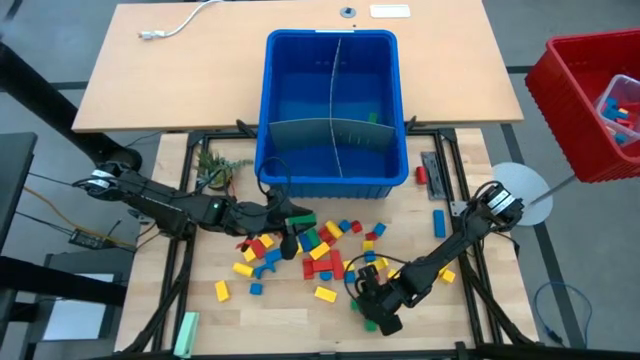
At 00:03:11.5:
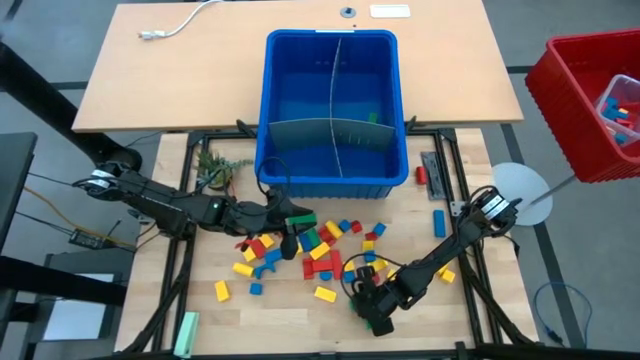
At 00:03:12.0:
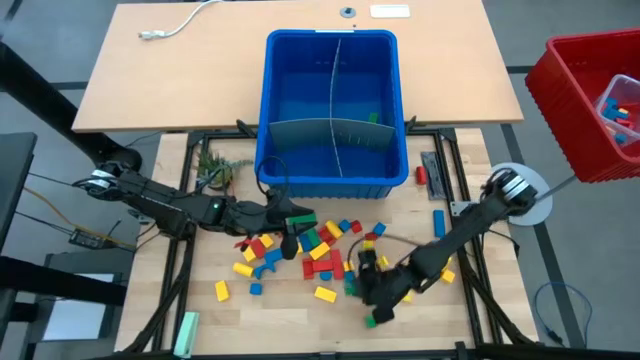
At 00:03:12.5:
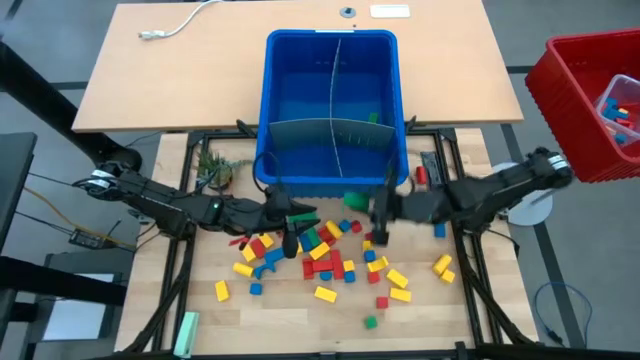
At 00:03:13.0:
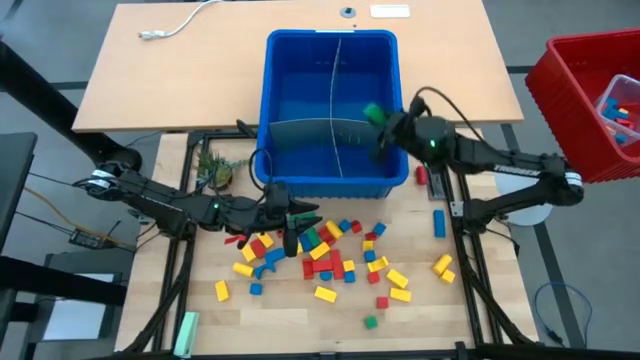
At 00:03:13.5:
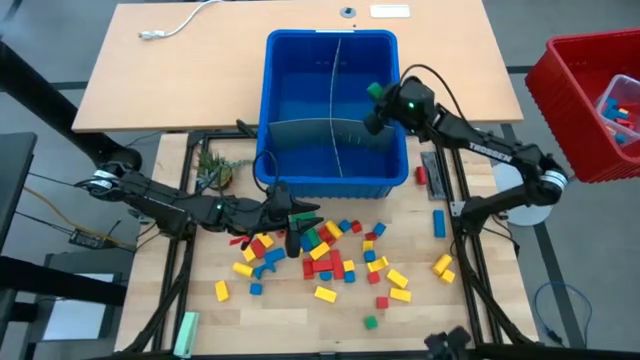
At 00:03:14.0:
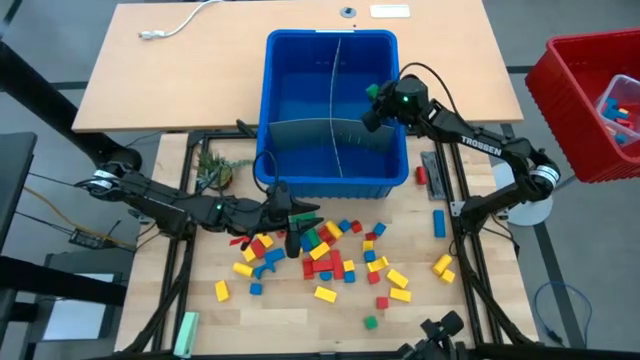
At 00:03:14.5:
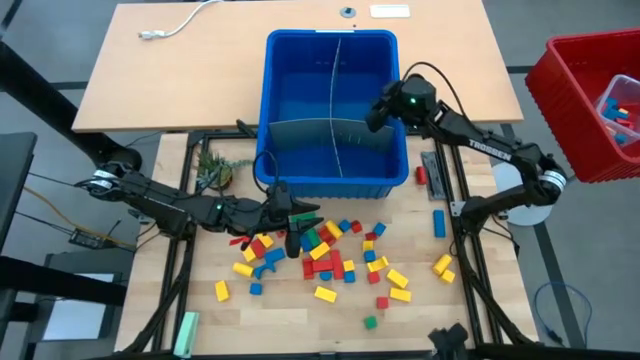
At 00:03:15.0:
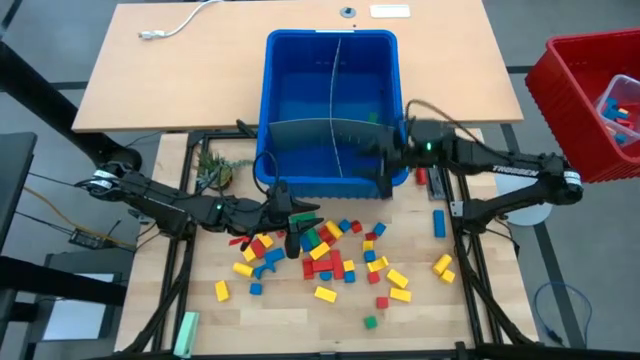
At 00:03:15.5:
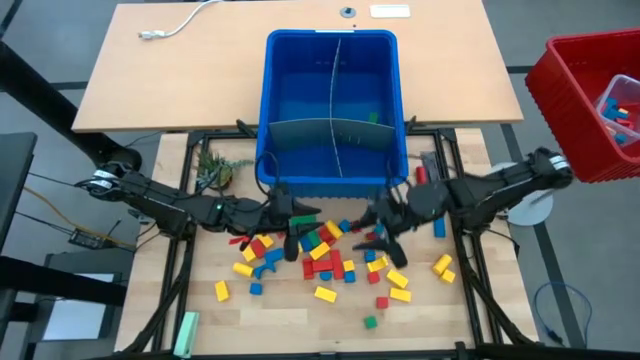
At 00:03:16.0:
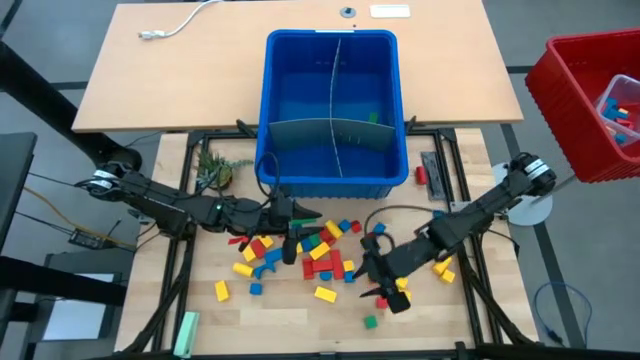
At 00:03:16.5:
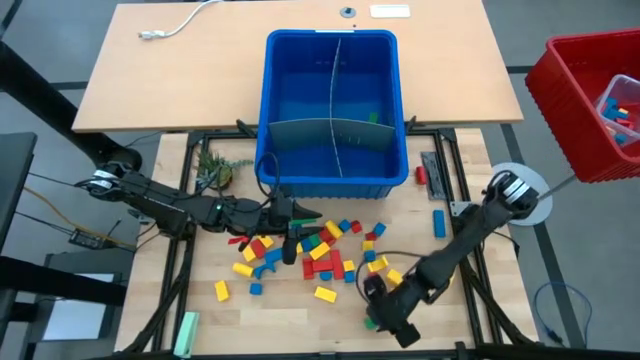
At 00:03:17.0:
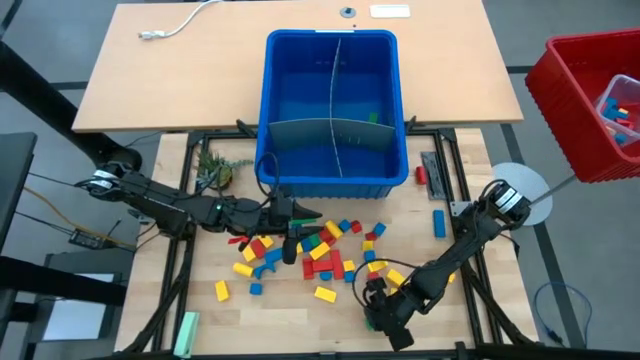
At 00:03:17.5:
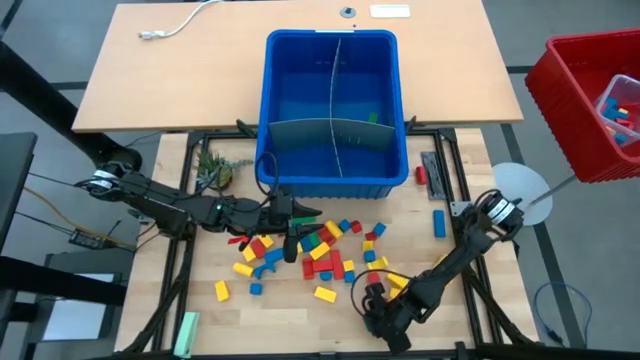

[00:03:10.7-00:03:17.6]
Task: Sort blocks
Put the green block with the other green blocks into the blue bin

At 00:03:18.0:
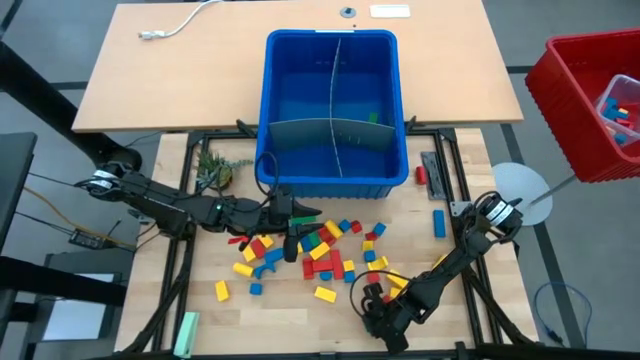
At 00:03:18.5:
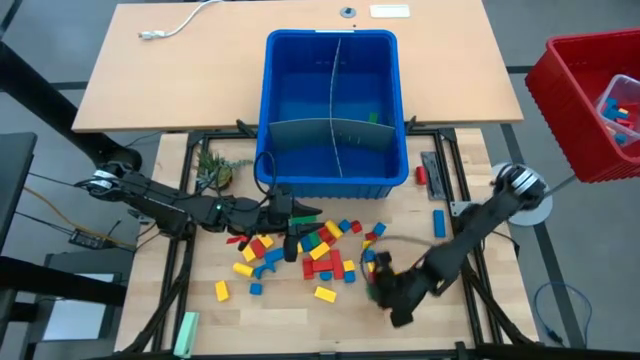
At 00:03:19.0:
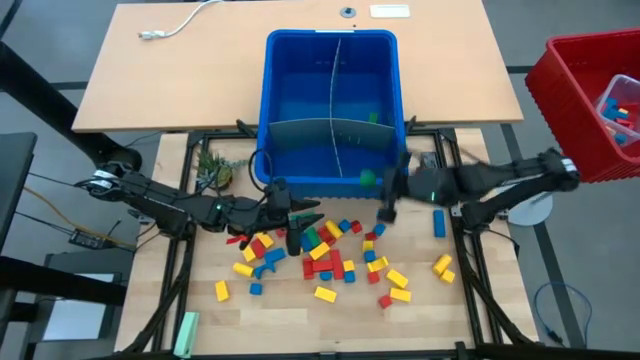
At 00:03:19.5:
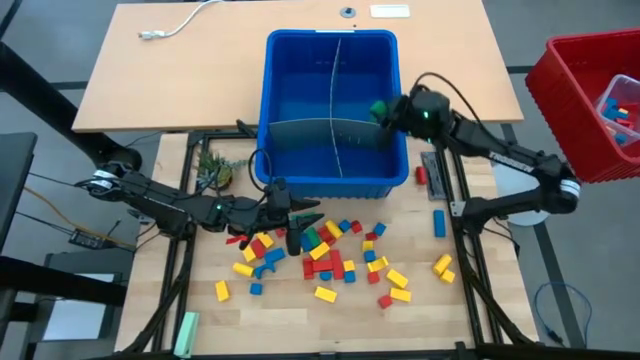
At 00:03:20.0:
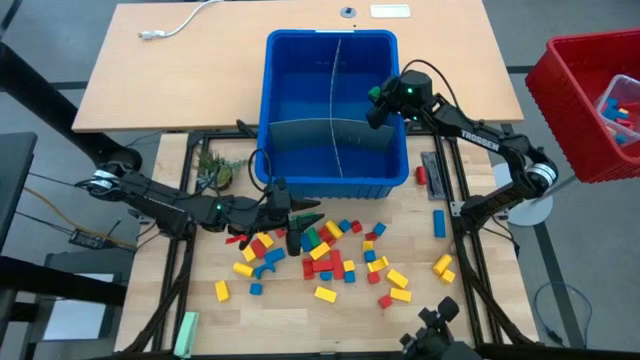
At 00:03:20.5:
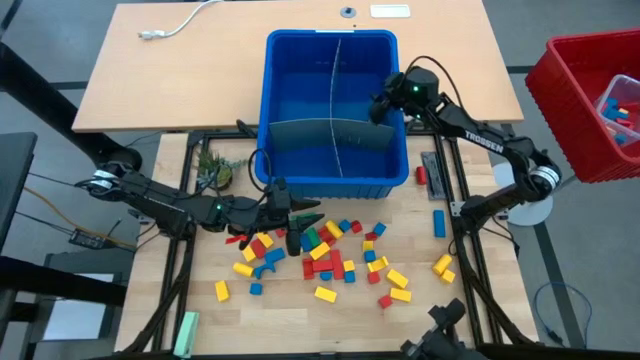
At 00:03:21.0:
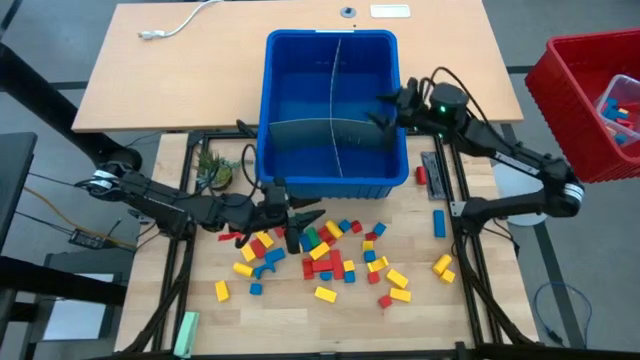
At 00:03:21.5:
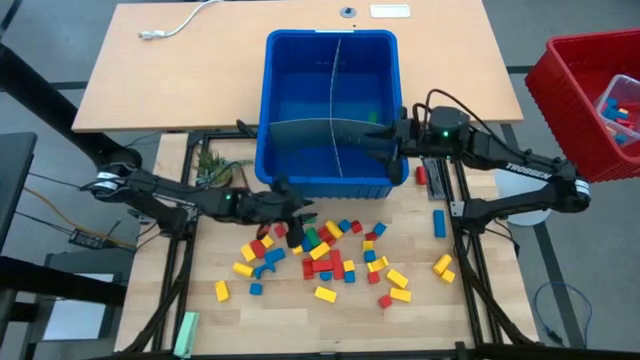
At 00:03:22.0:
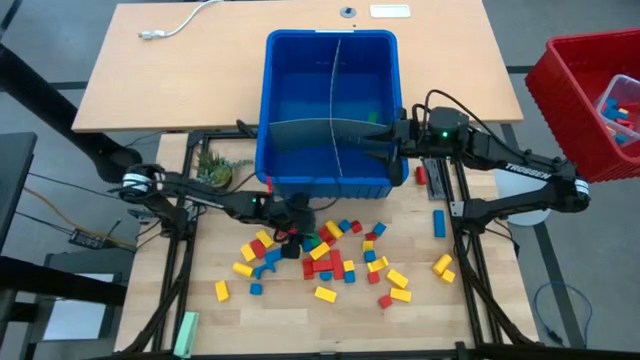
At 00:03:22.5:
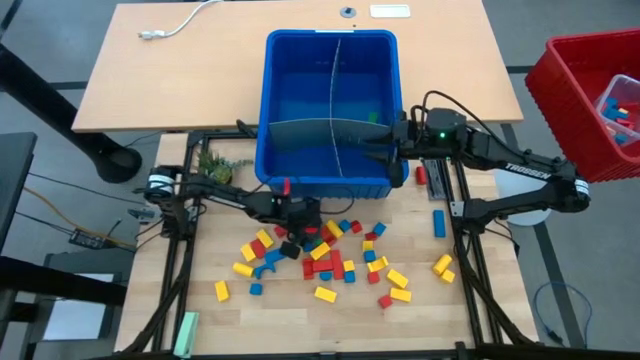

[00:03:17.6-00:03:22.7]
Put the green block with the other green blocks into the blue bin

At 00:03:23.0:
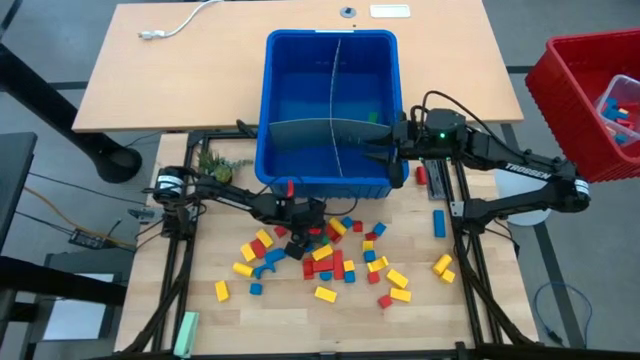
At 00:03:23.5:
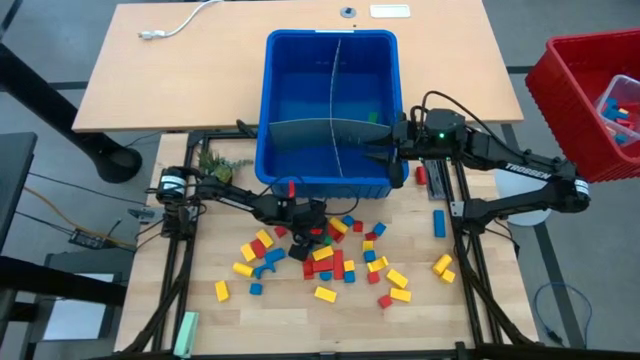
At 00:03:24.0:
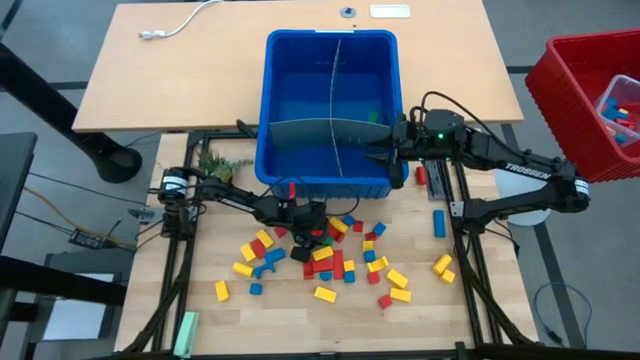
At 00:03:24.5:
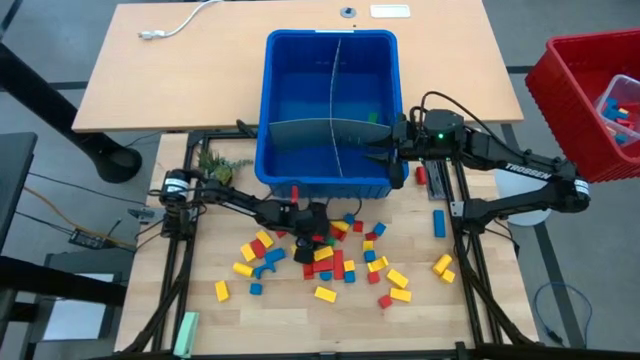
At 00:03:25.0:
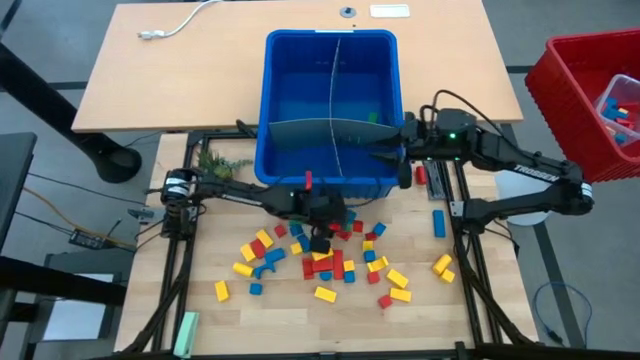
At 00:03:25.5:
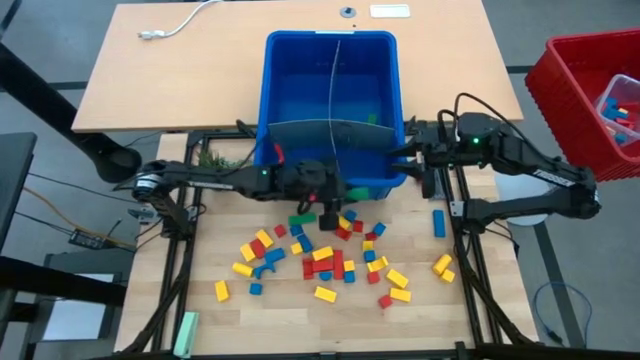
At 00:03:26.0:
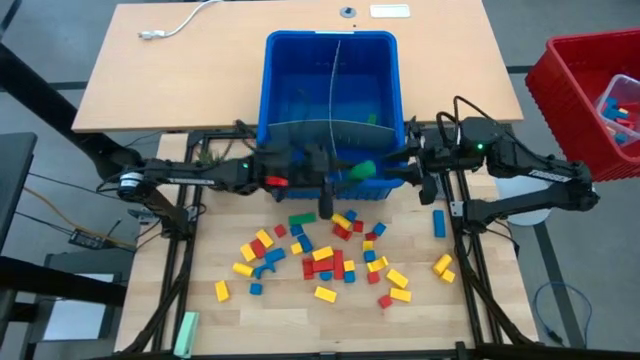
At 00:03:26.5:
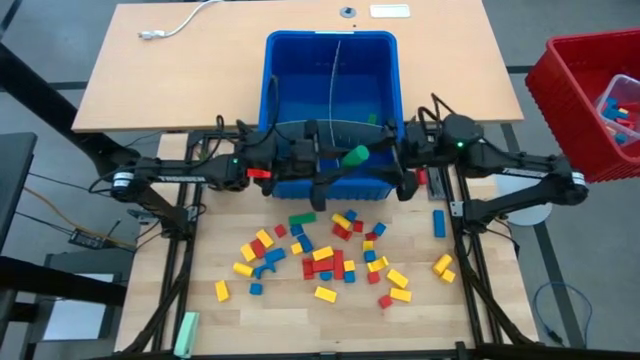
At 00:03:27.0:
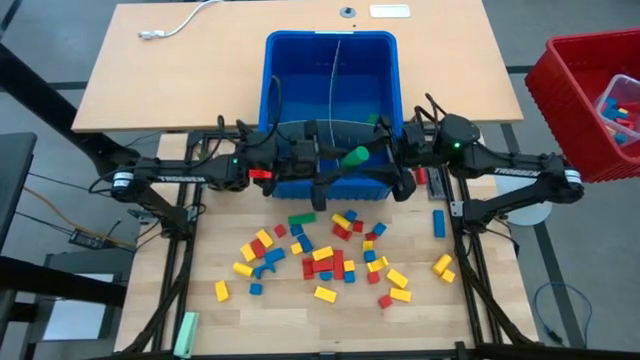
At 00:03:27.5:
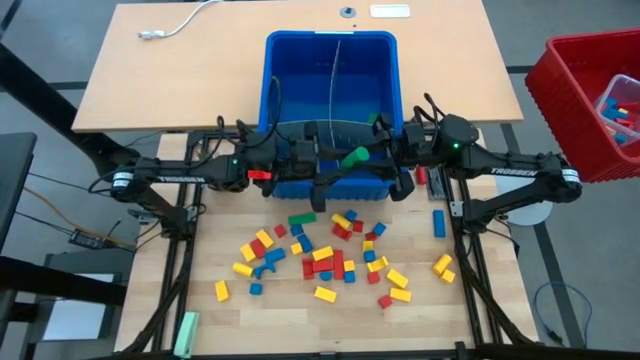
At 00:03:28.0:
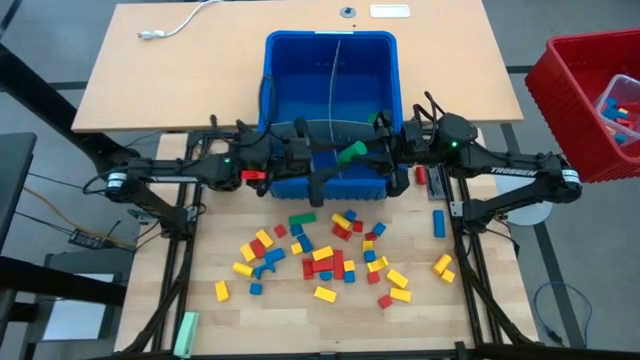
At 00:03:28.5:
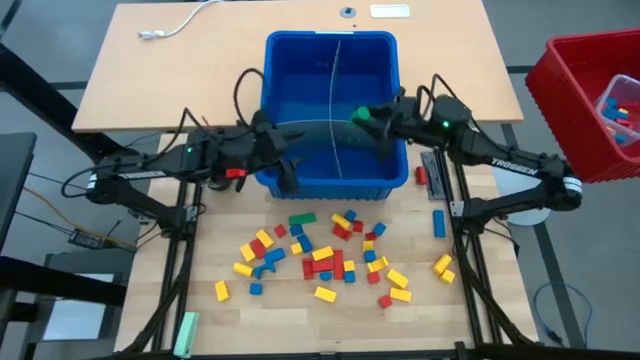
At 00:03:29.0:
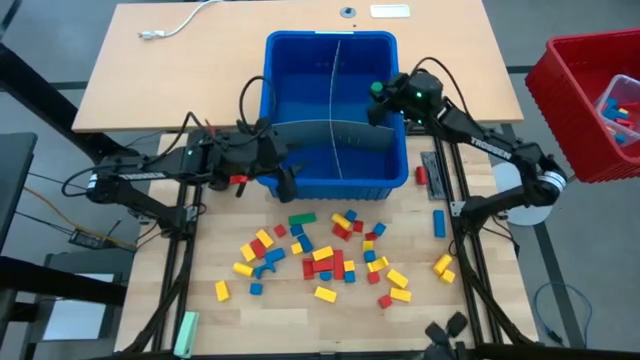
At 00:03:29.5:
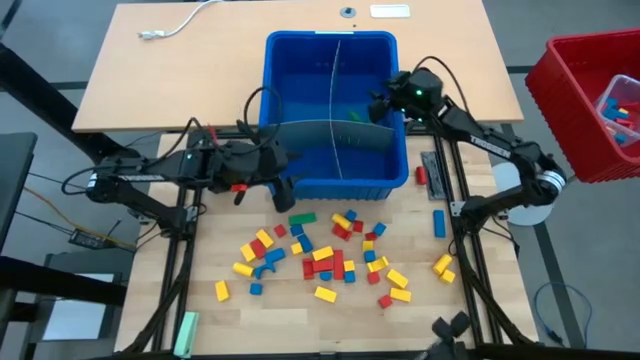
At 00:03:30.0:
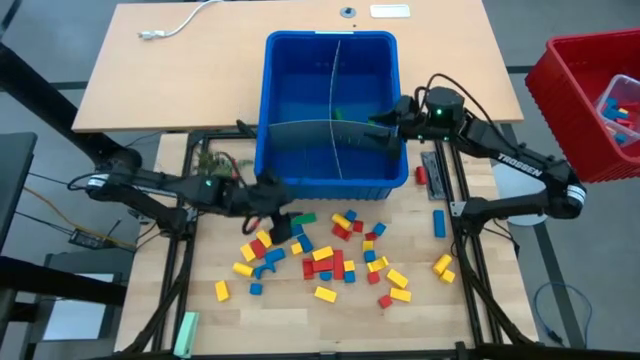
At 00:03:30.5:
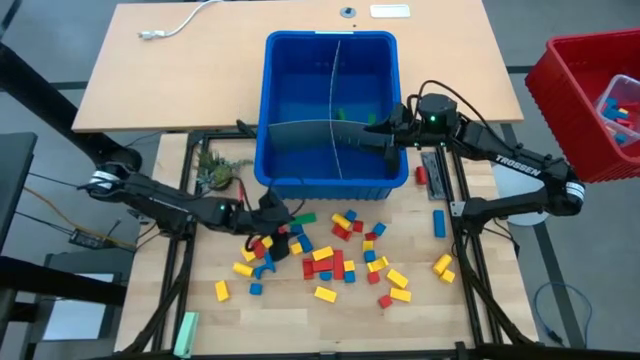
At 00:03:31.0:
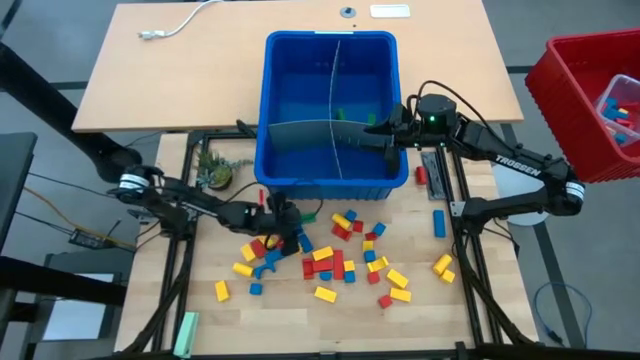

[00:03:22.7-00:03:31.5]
Put the green block with the other green blocks into the blue bin
